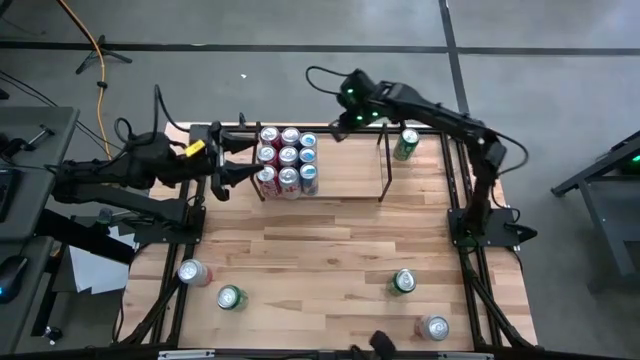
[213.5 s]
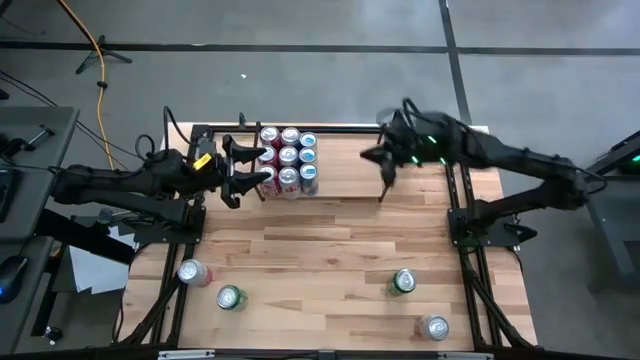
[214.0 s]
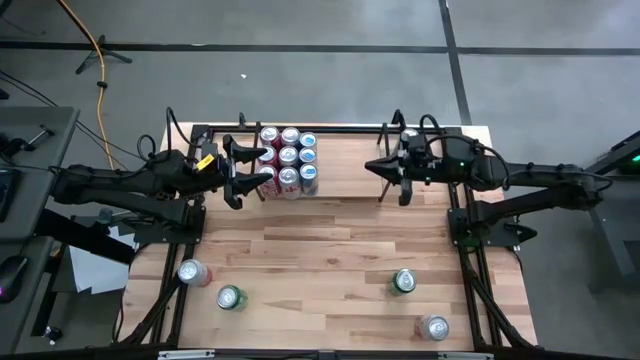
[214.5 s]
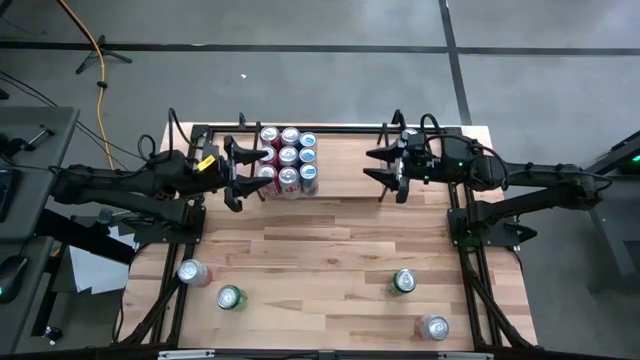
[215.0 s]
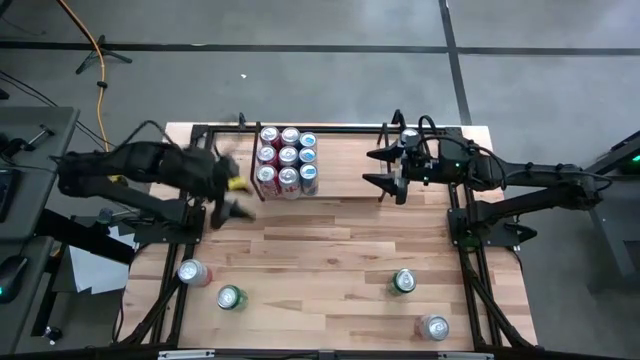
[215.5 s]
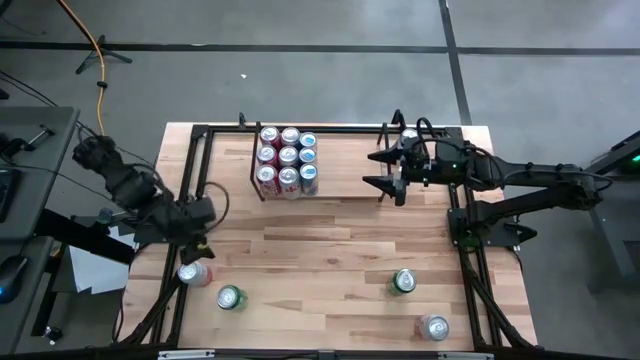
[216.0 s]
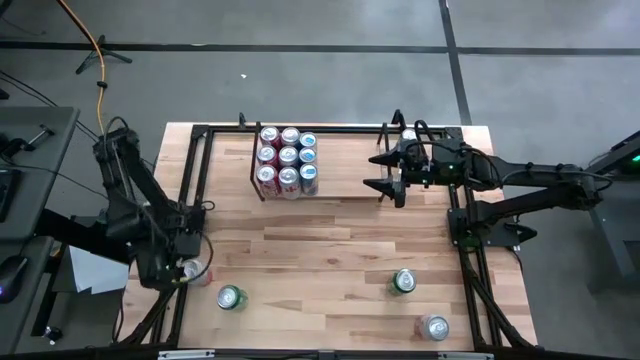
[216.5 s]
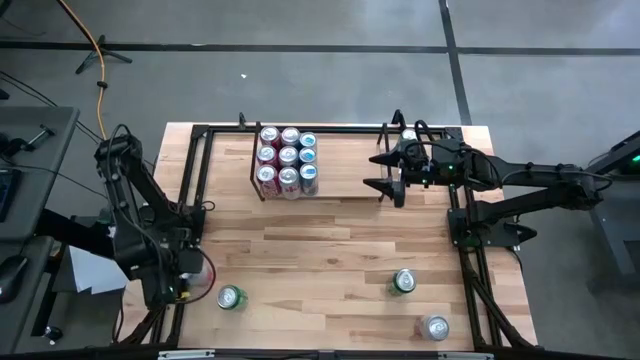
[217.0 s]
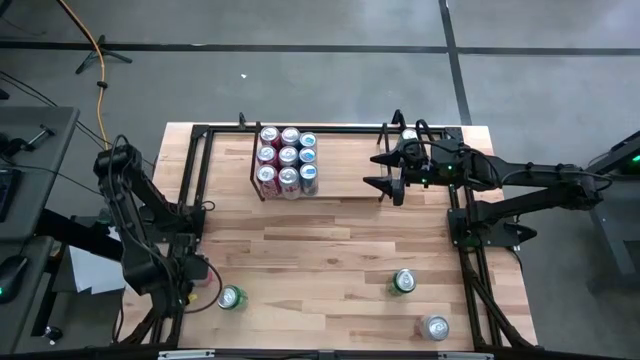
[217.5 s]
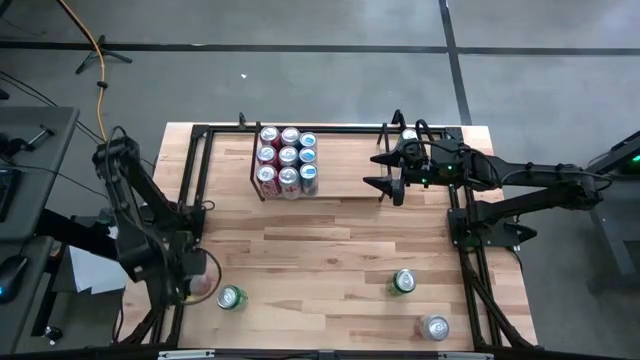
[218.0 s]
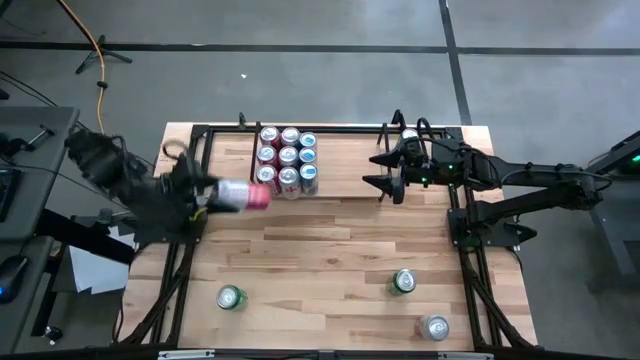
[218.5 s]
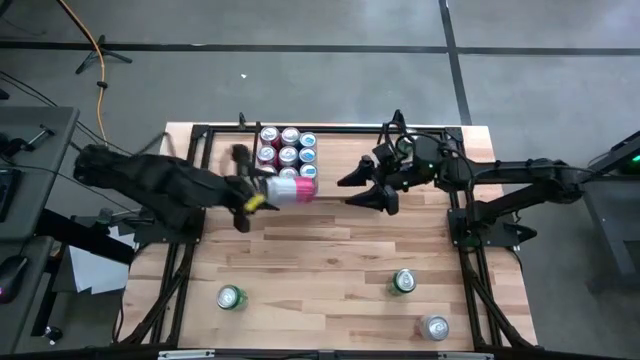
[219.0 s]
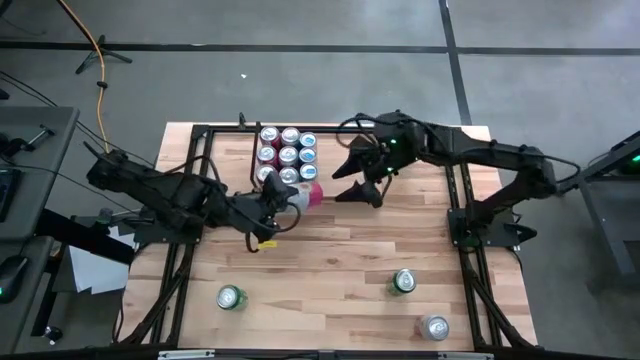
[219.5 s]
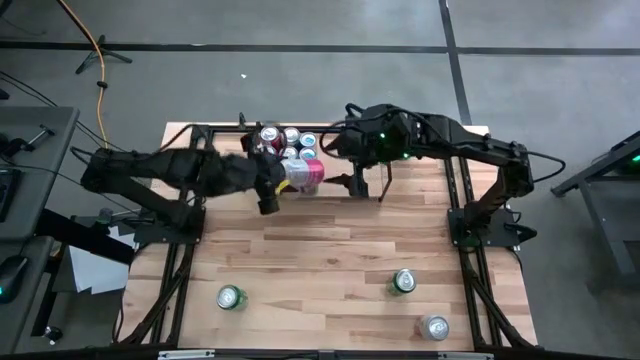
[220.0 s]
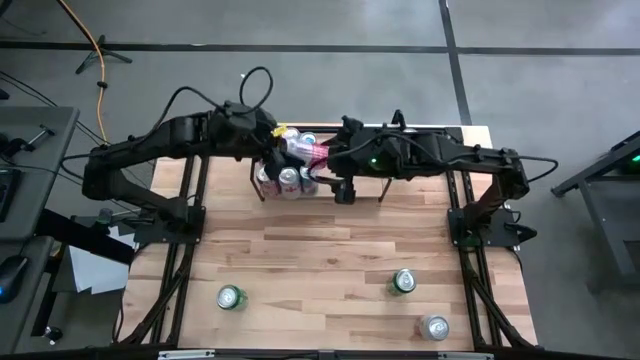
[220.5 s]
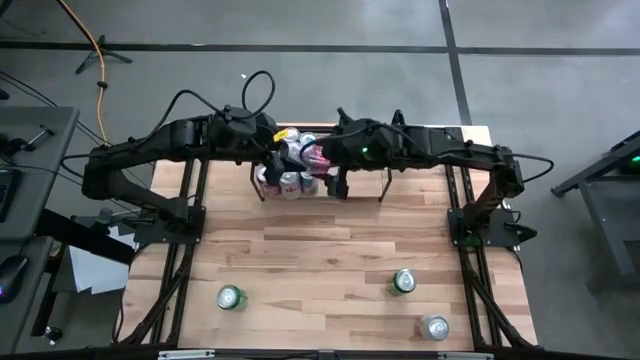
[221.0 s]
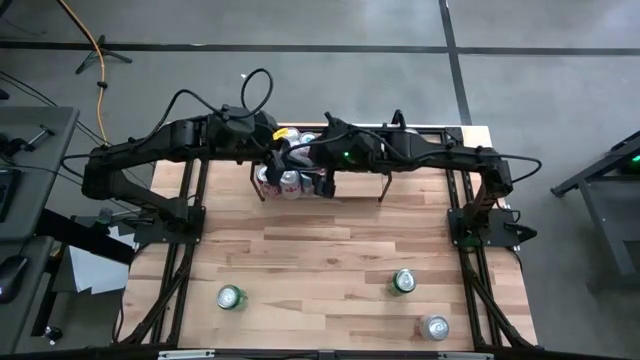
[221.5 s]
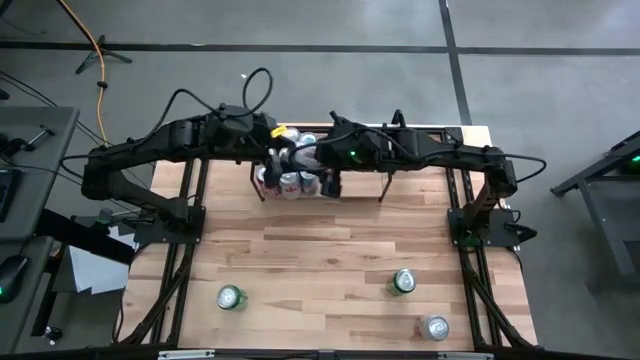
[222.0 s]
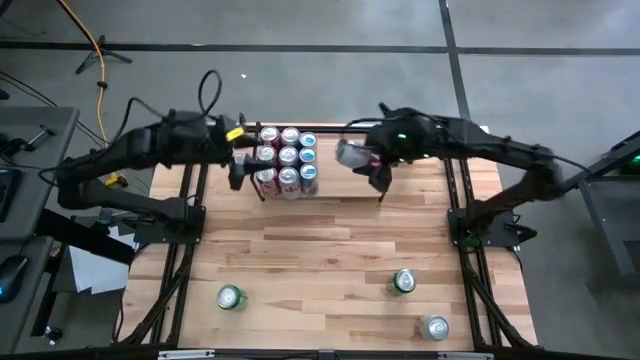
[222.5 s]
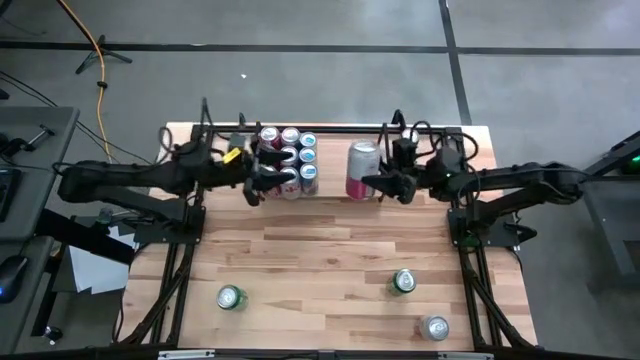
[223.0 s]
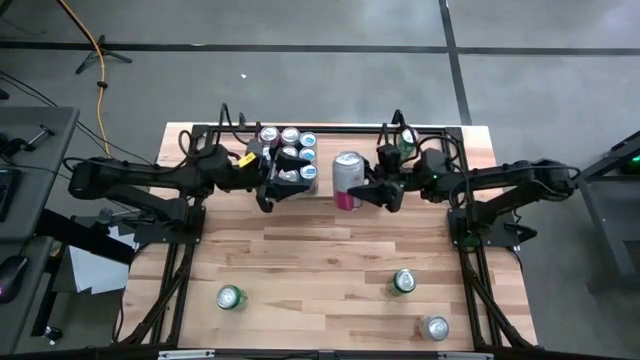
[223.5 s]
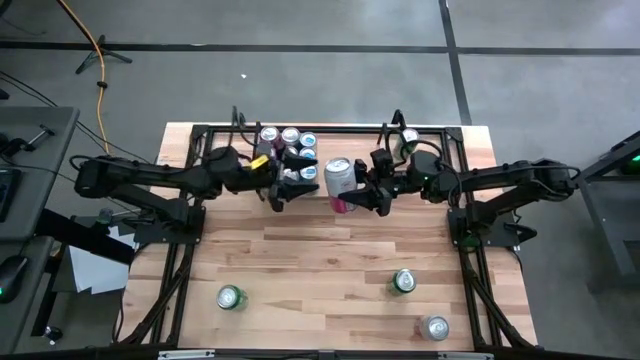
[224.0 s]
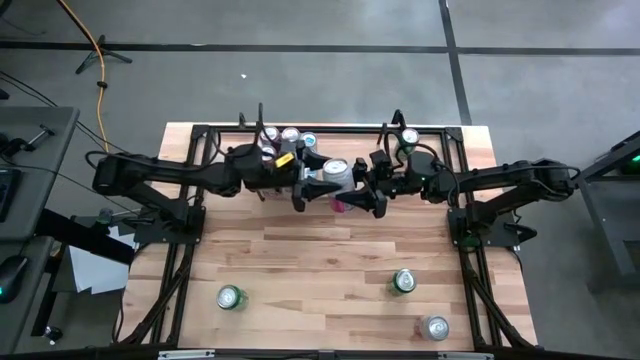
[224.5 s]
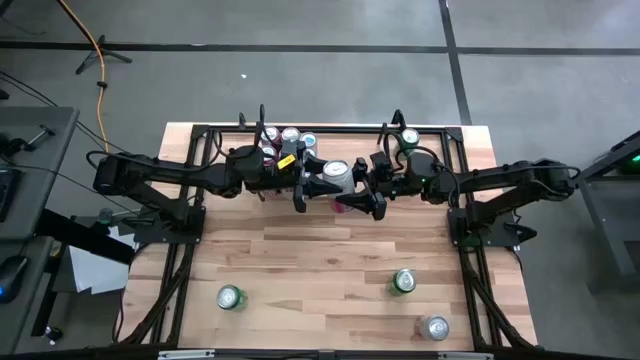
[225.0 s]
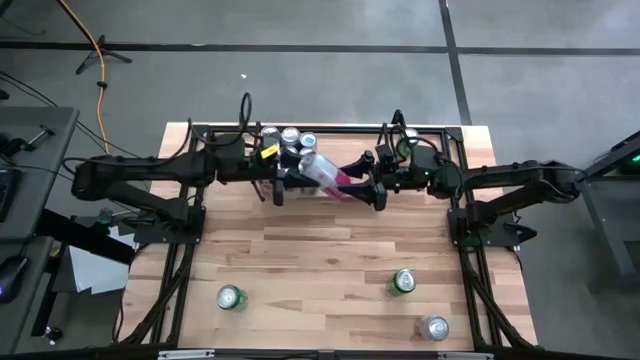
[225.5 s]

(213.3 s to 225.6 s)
Task: Place canned beverage on shelf
Put the left pink soda can on the shelf

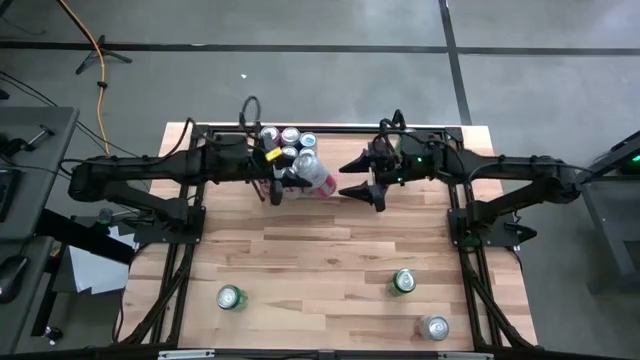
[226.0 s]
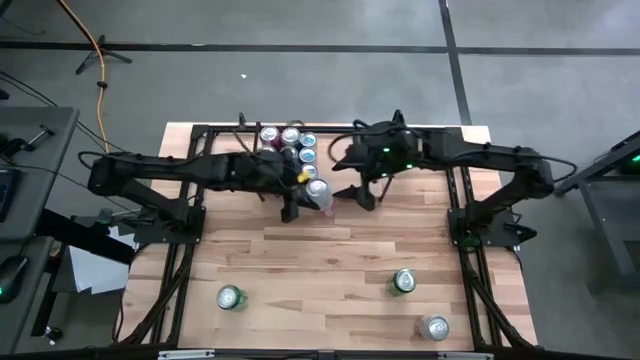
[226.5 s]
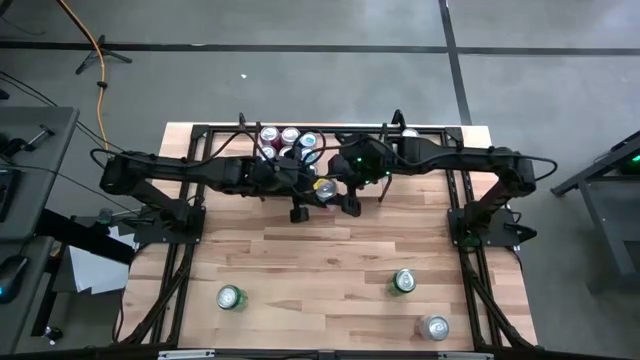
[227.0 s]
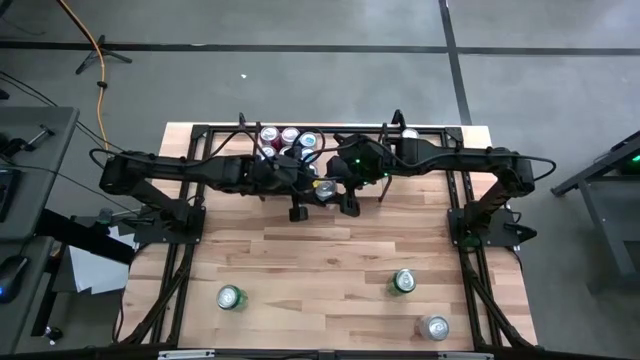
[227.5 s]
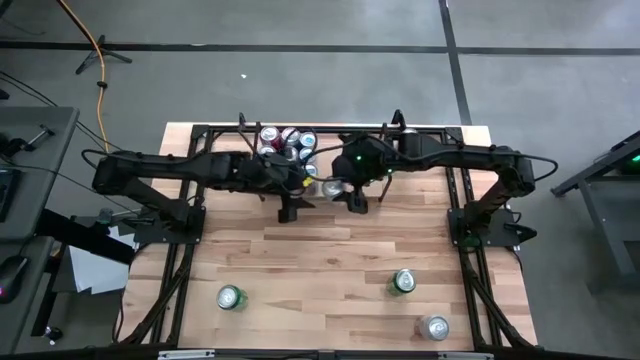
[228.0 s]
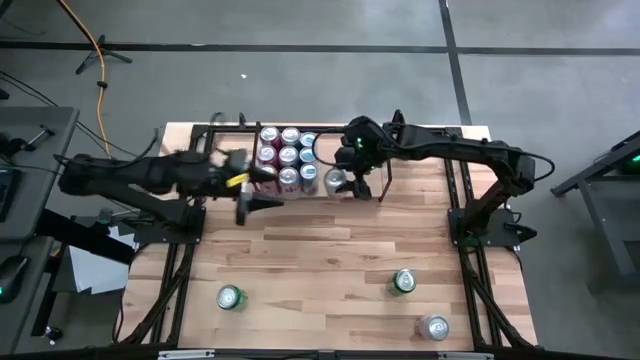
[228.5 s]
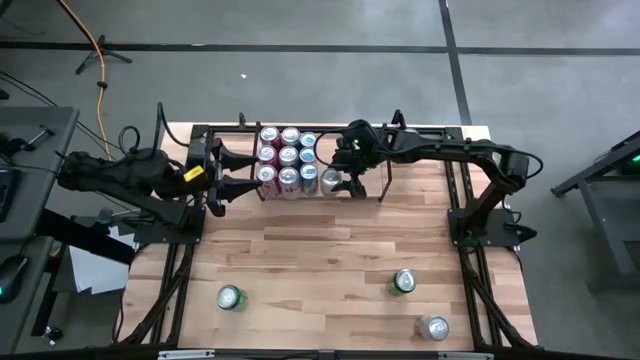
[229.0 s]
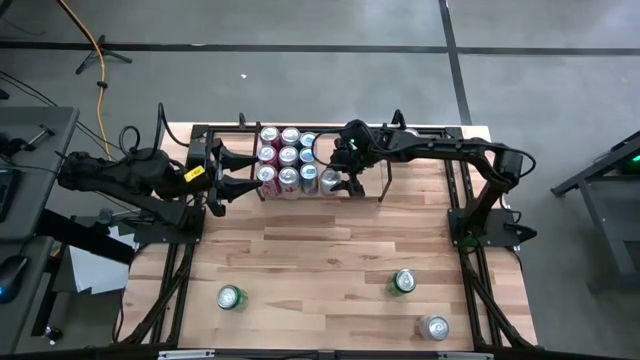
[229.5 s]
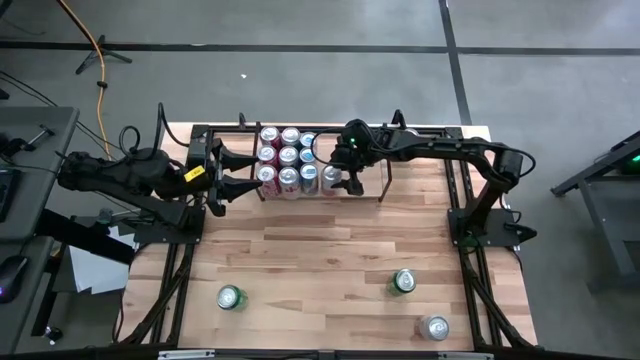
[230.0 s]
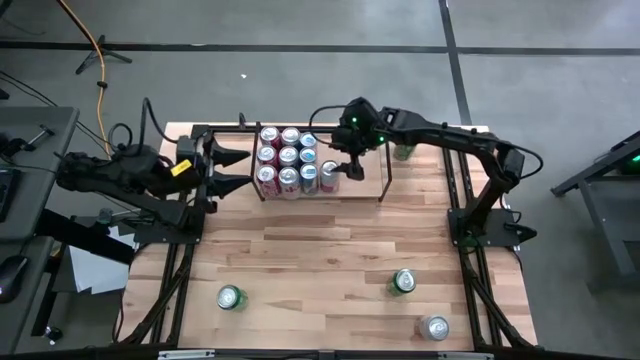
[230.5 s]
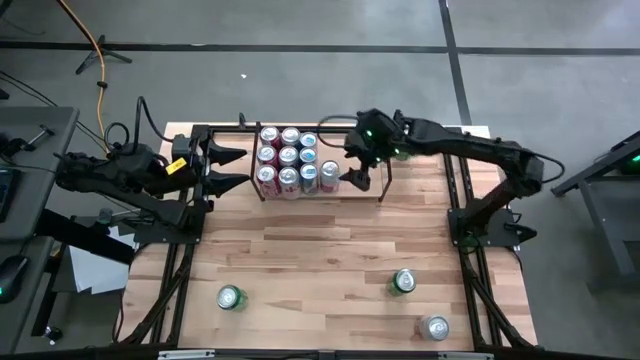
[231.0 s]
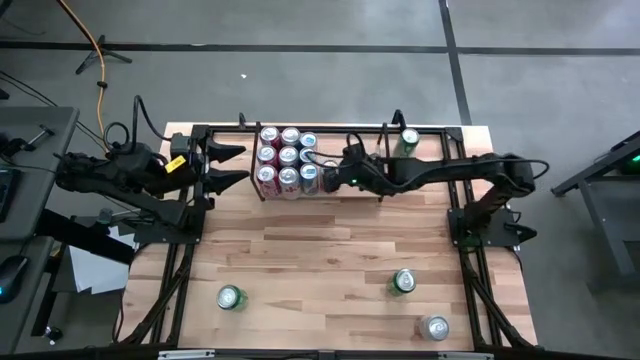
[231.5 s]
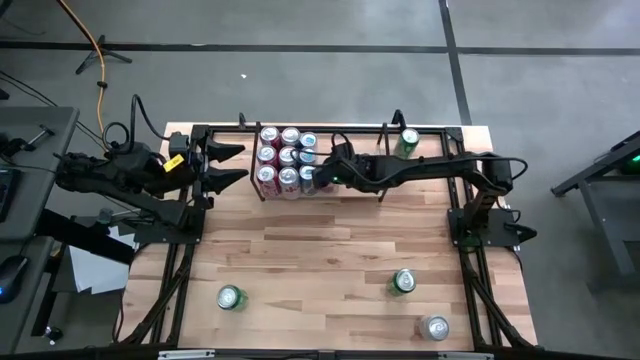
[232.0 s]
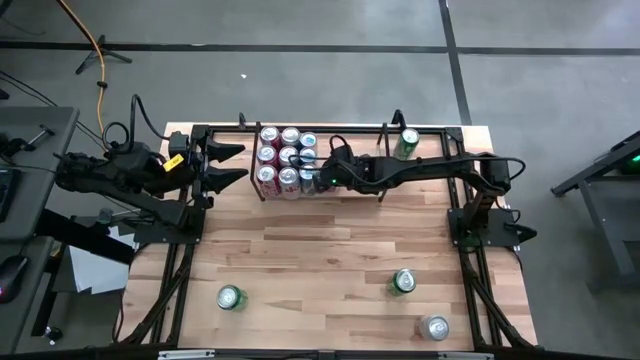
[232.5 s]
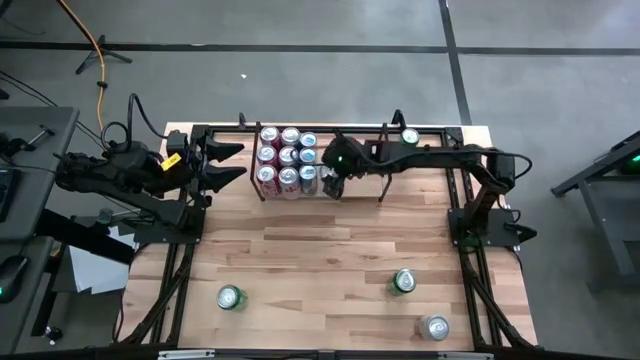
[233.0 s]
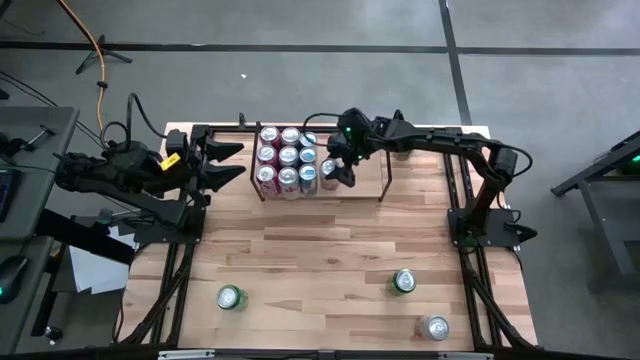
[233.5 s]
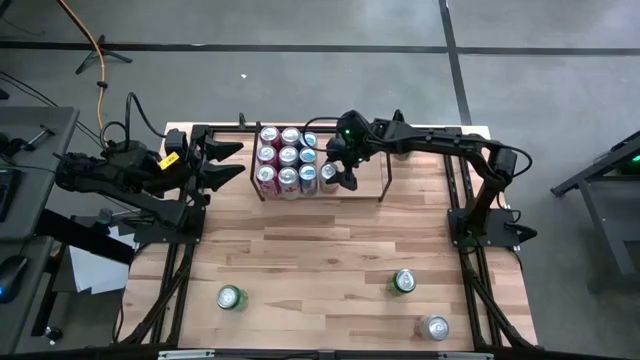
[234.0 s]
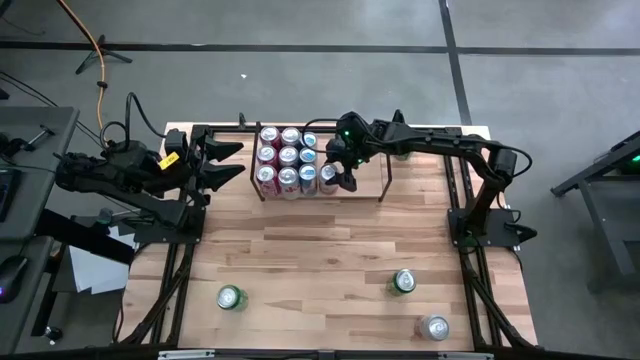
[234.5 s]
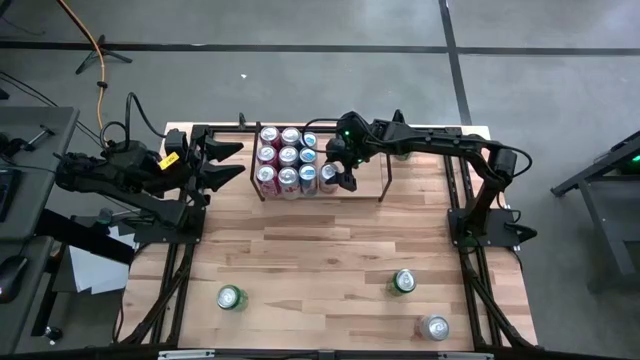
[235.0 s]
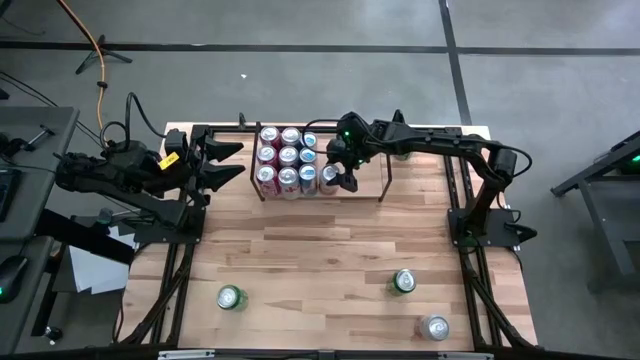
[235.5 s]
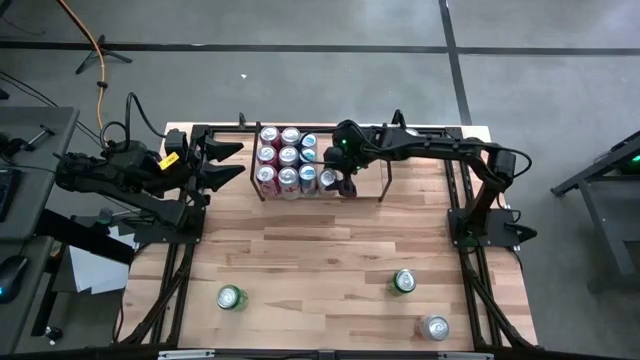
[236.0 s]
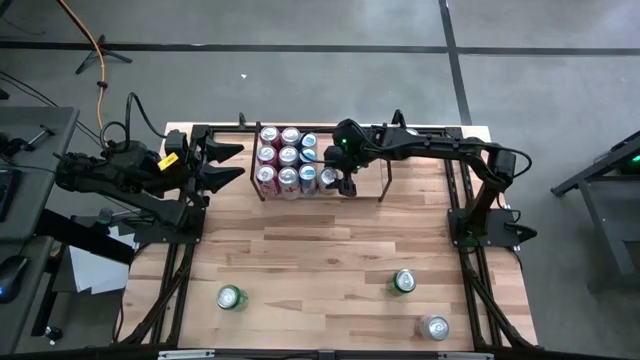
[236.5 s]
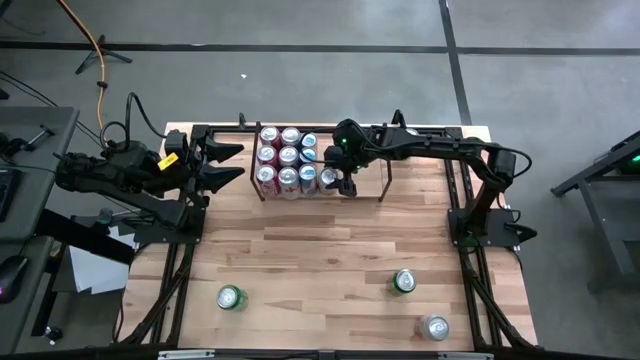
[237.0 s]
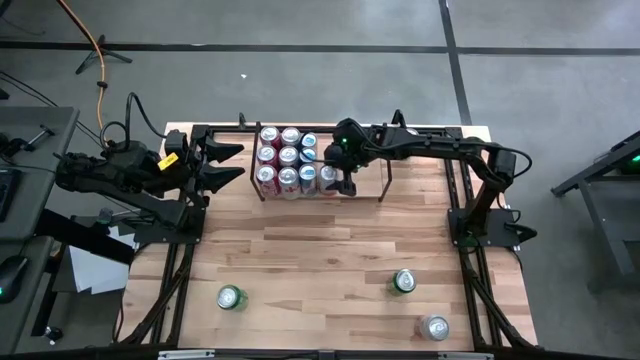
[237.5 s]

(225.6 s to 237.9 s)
Put the left pink soda can on the shelf
